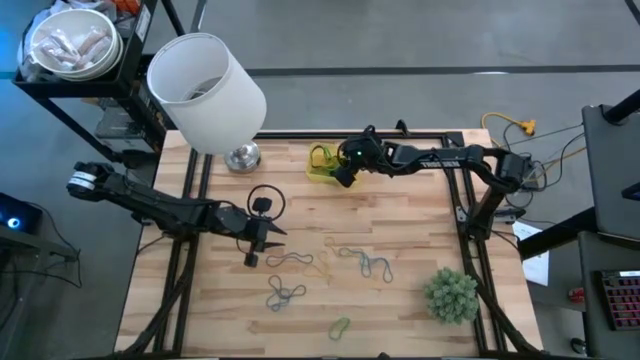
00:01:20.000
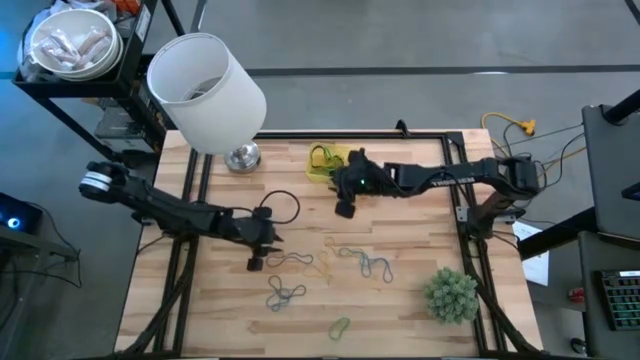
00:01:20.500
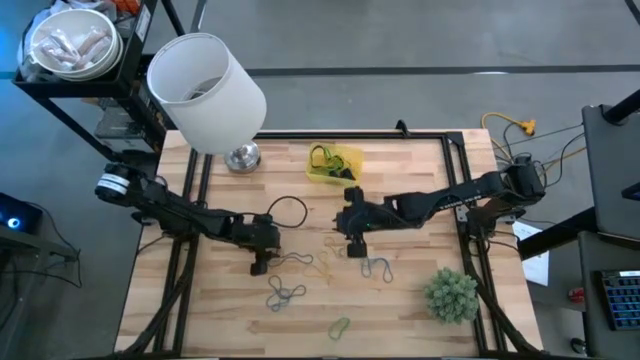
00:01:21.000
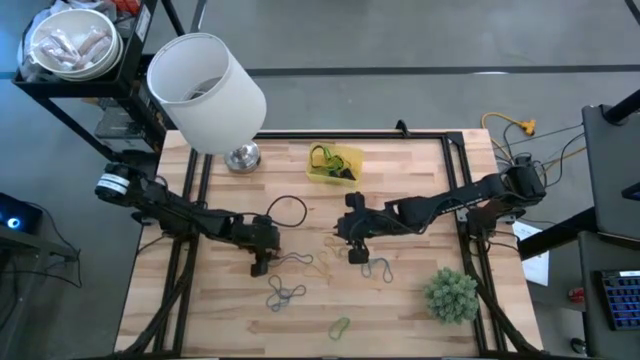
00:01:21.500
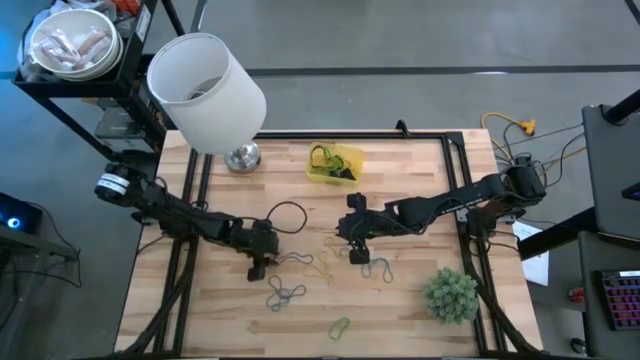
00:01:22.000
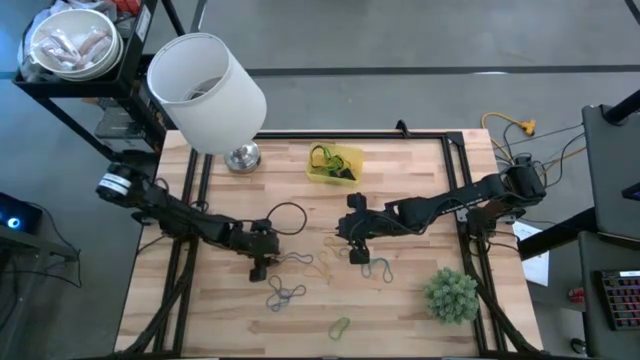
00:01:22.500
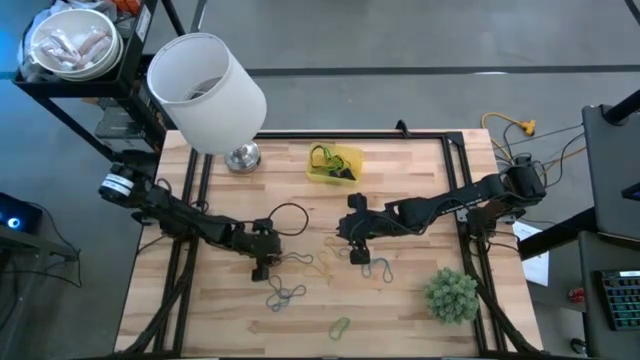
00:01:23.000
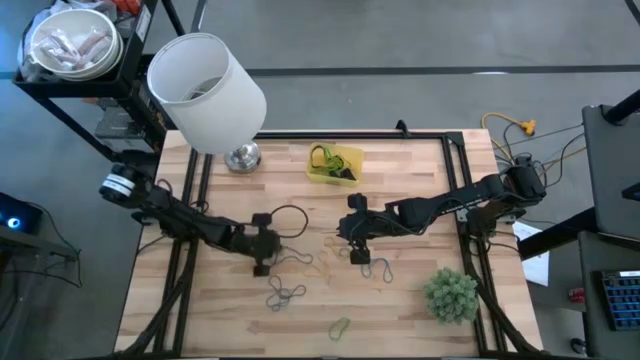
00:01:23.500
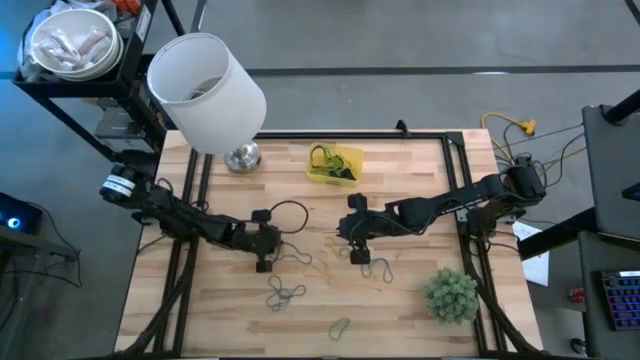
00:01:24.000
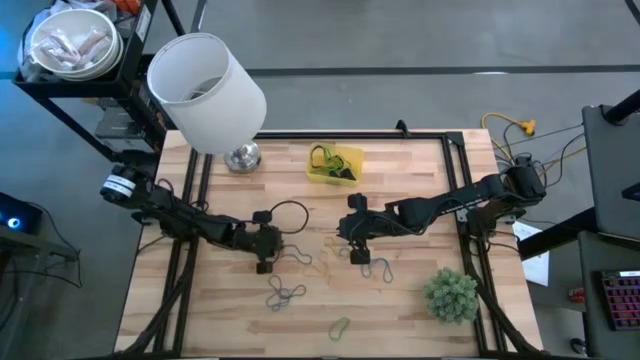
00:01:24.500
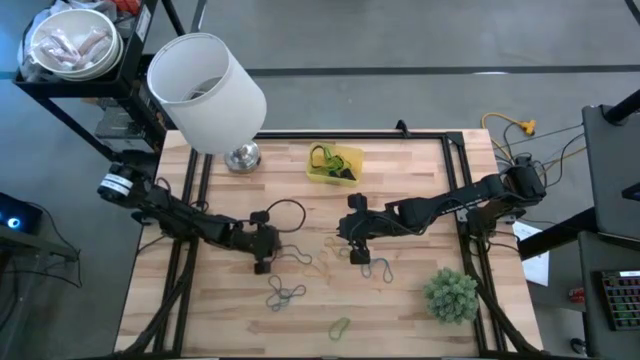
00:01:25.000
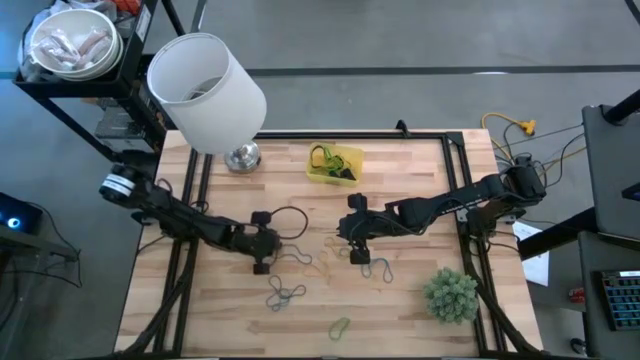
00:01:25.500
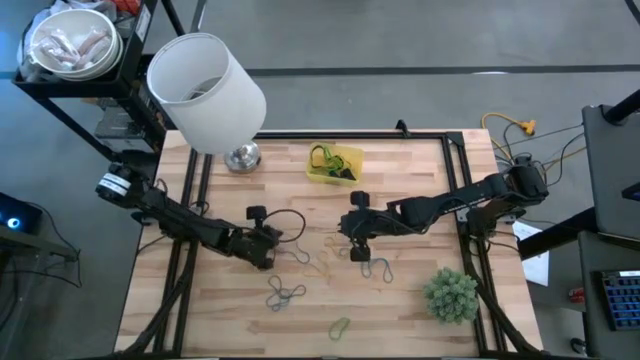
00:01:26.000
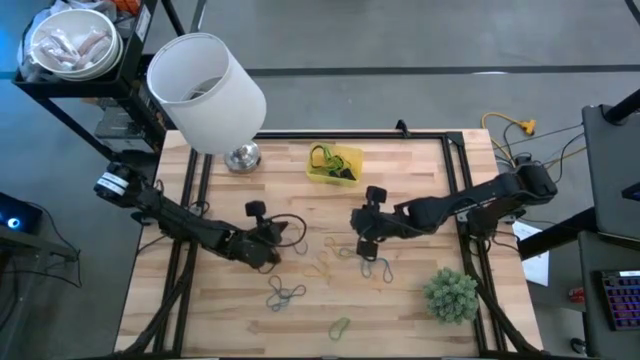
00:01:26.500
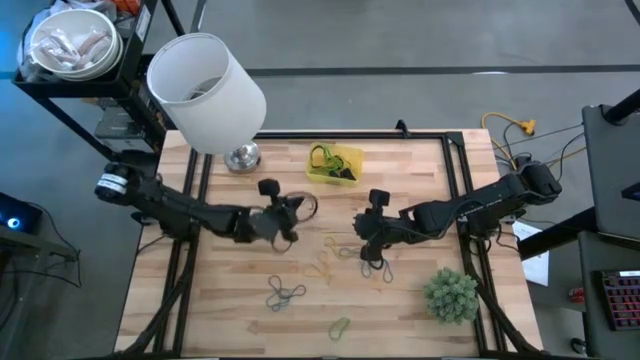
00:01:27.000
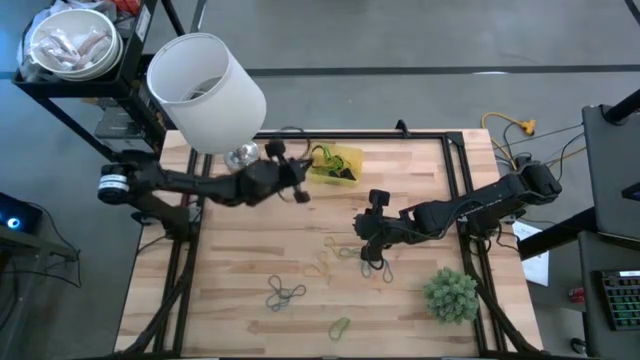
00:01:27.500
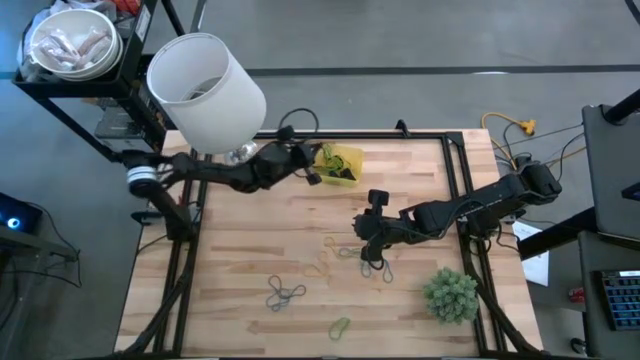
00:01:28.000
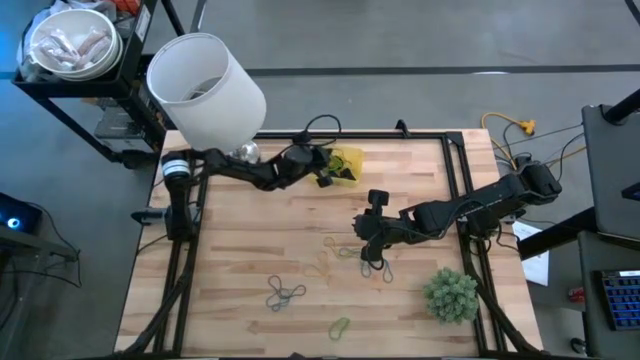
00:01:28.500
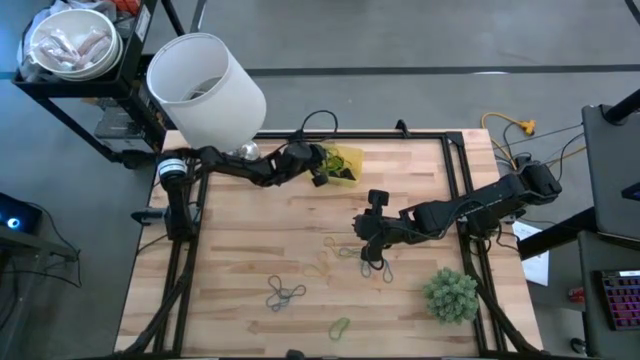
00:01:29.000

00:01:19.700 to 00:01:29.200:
Task: Pick and place rubber bands into bin
Put the purple rubber band into the yellow bin

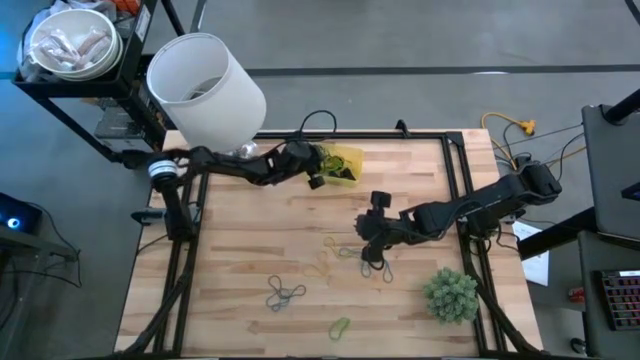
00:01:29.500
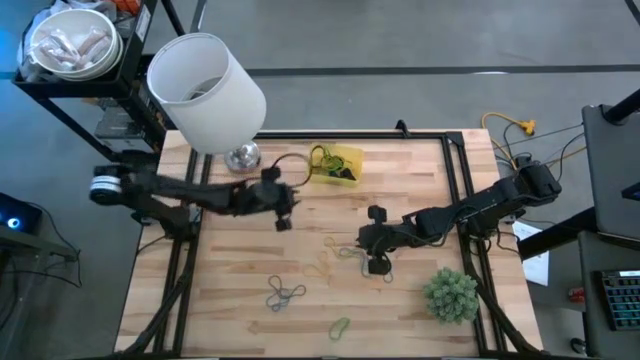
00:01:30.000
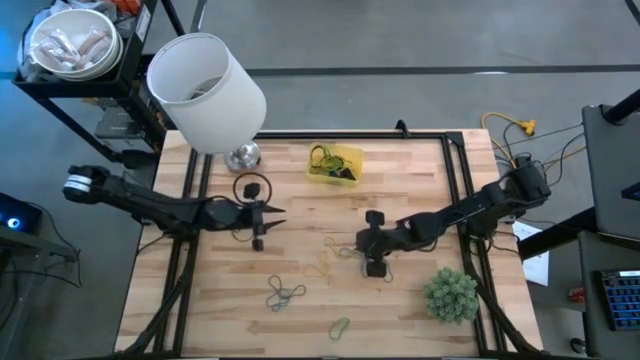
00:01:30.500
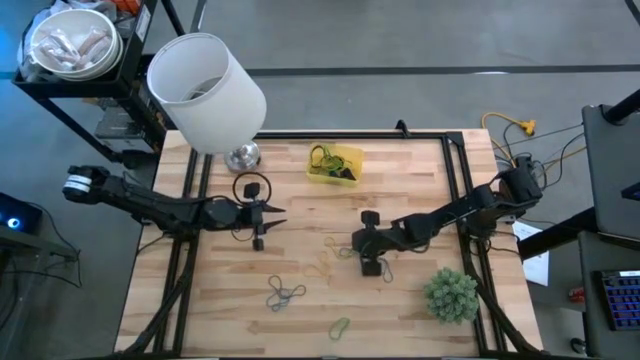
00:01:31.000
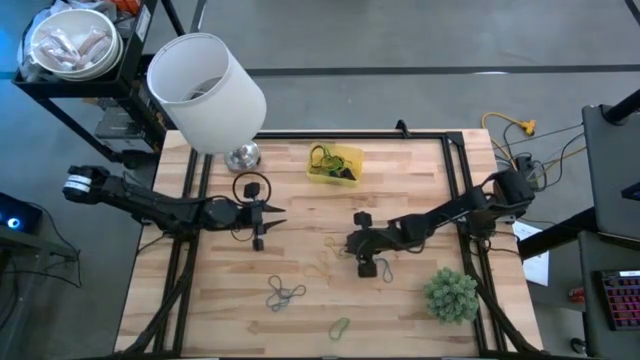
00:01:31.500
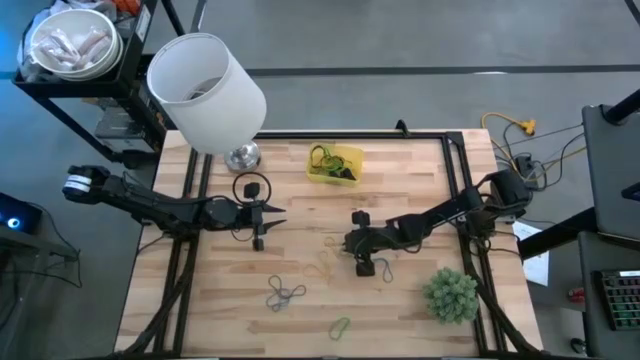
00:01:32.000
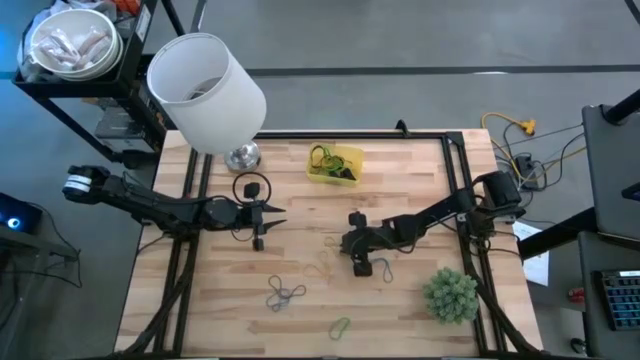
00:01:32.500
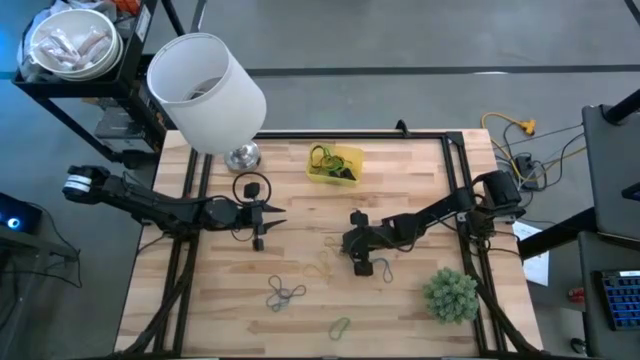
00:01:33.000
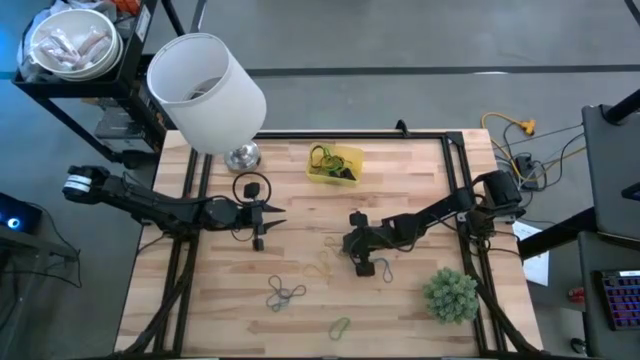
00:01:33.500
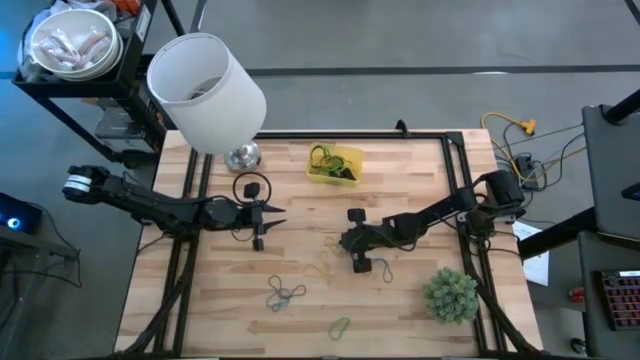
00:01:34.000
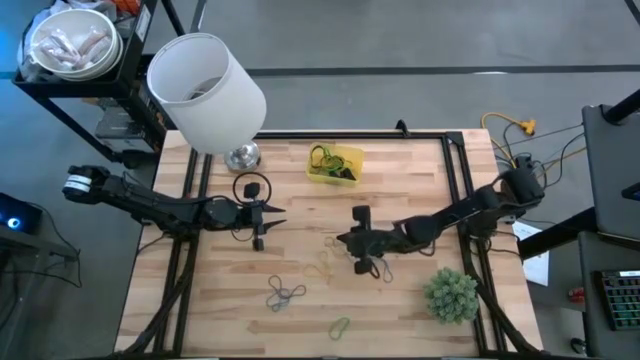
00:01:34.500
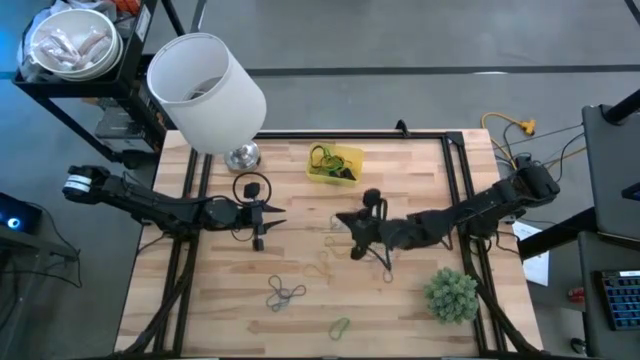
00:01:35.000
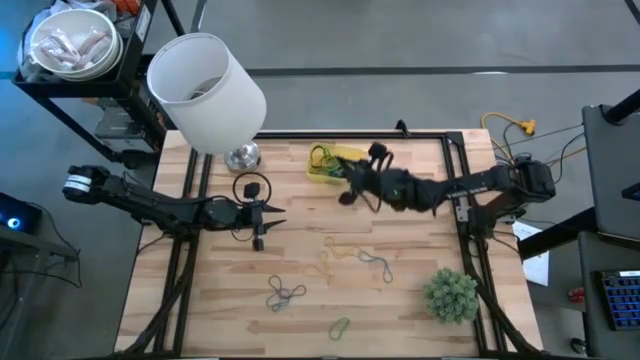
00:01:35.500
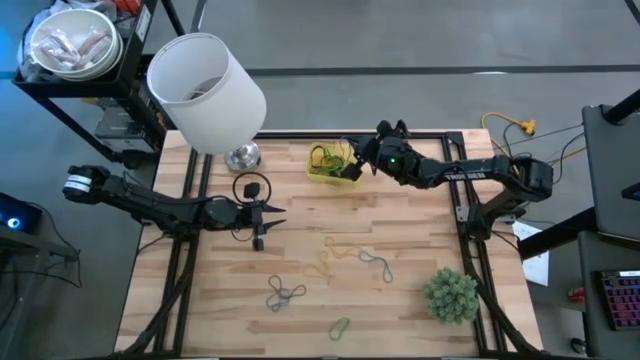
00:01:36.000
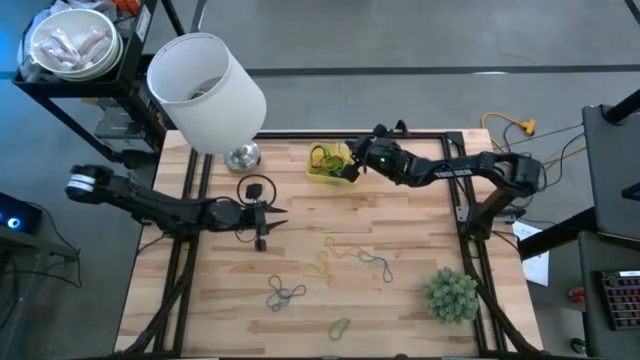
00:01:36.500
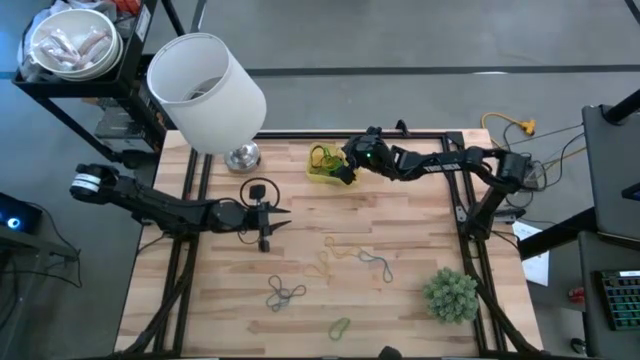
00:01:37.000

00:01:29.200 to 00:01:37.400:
Put the blue rubber band into the yellow bin

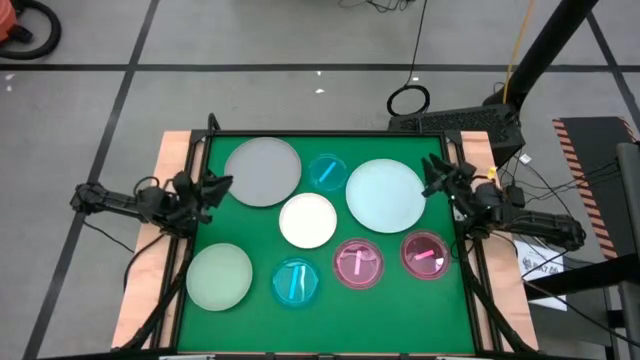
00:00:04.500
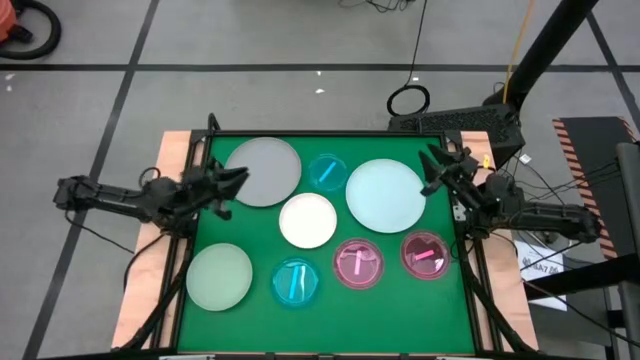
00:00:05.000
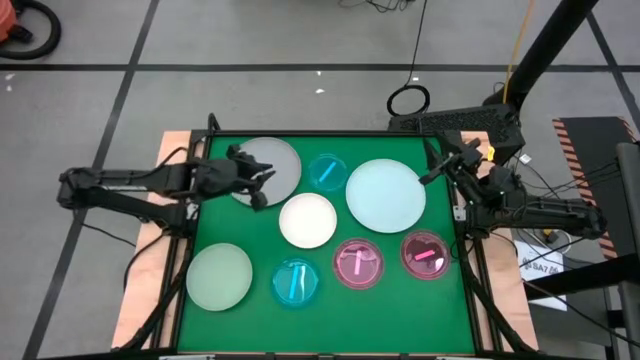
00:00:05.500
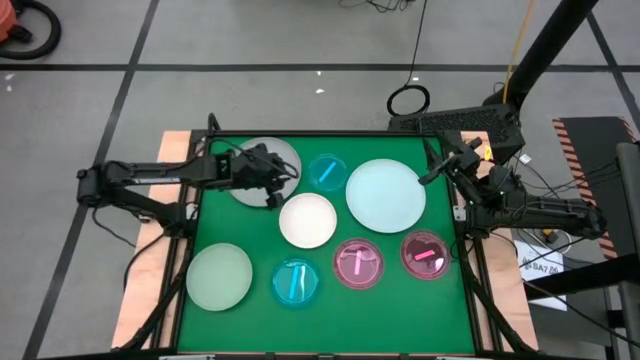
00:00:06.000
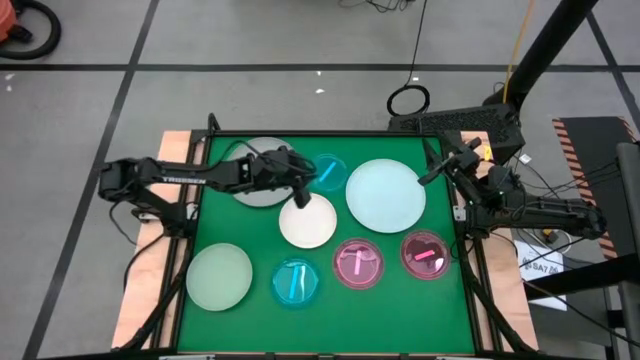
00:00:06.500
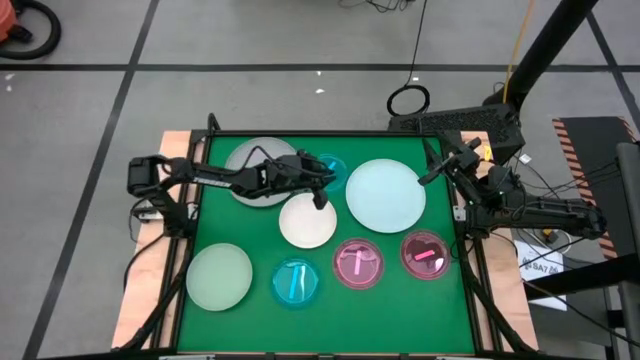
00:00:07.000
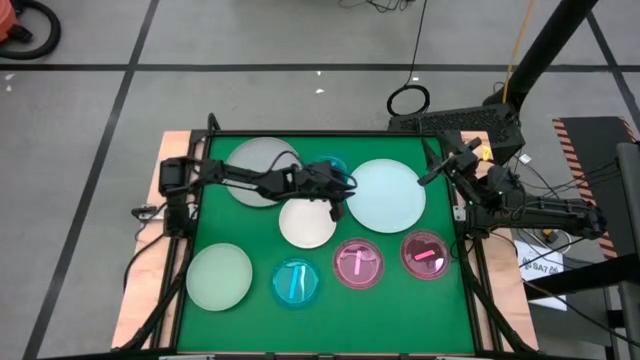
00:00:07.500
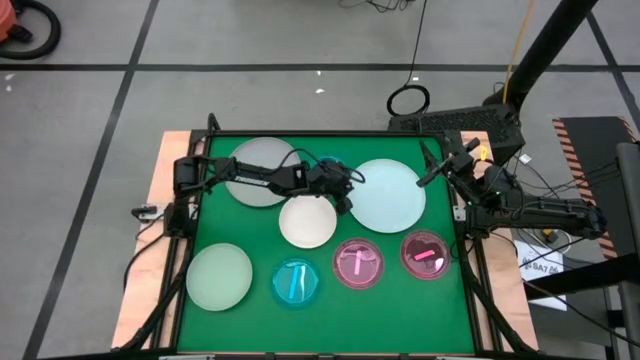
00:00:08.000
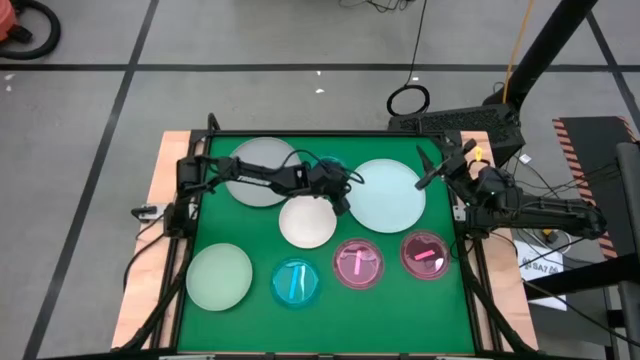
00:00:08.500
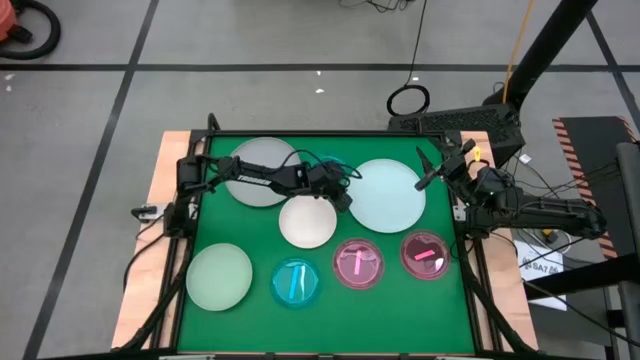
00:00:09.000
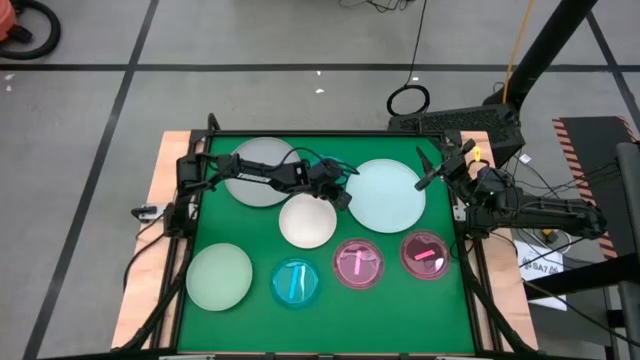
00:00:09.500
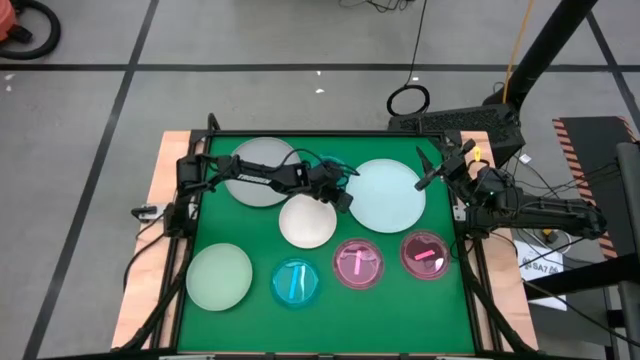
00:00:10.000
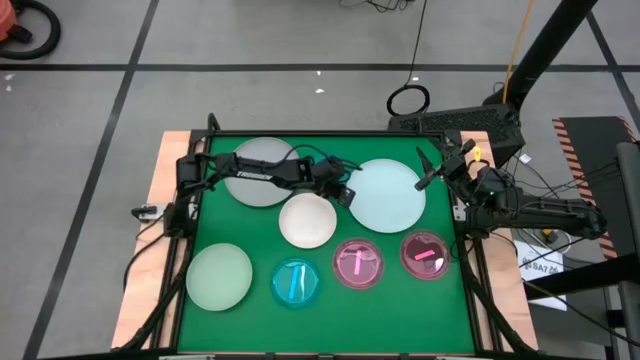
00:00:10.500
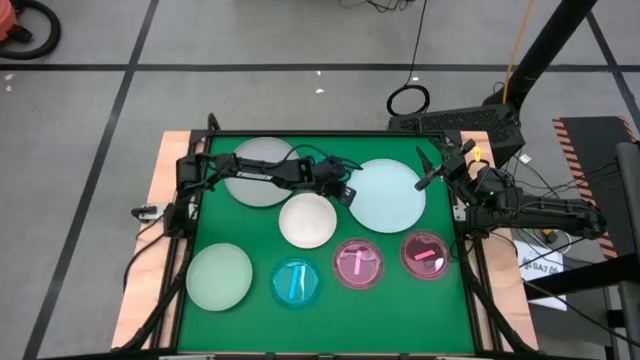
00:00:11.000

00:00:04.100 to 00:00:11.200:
Task: Stack plastic plates
Stack the light blue plate on top of the gray plate
